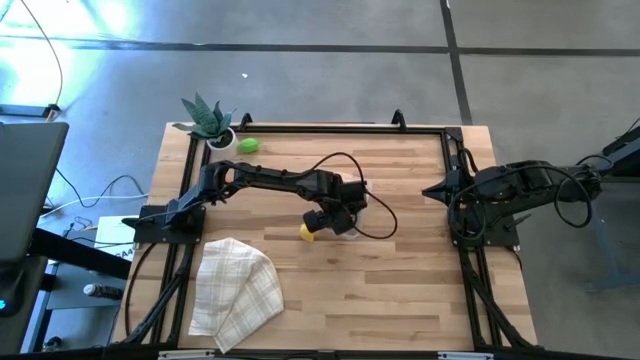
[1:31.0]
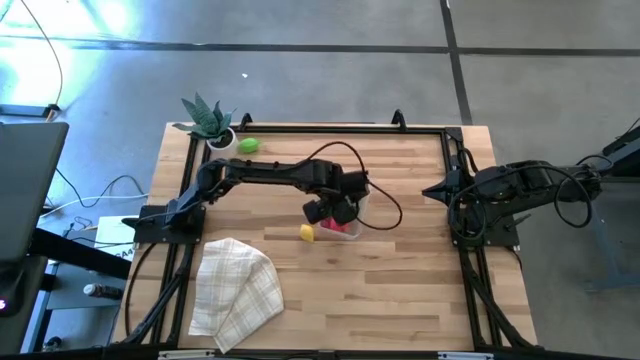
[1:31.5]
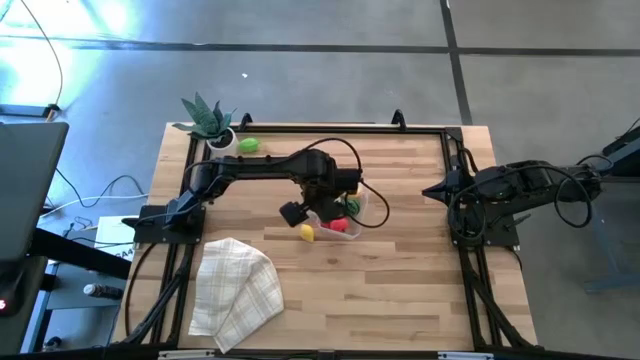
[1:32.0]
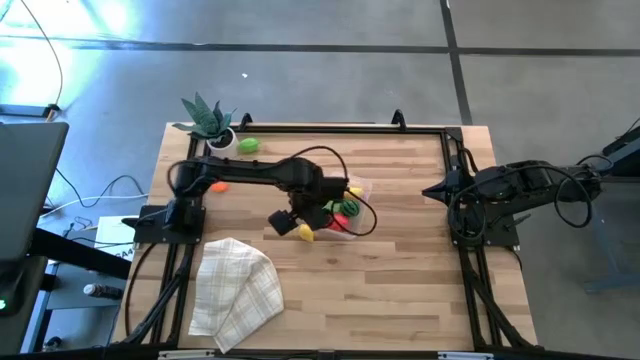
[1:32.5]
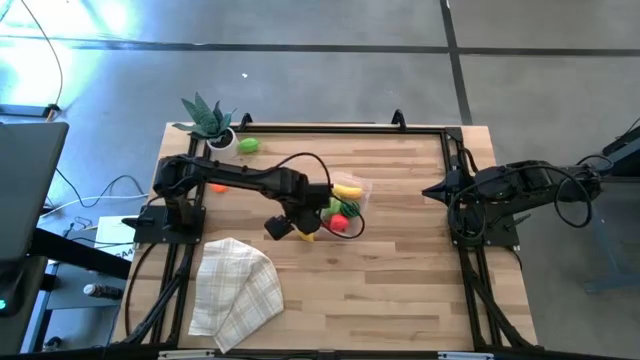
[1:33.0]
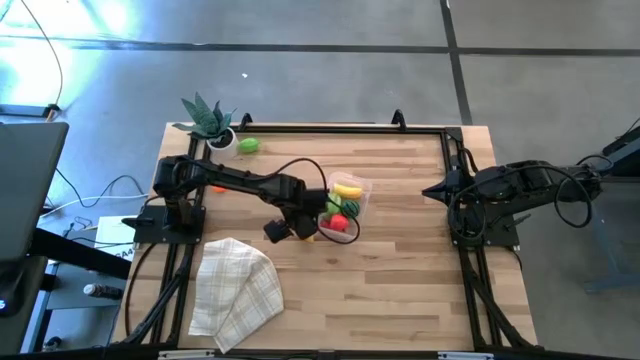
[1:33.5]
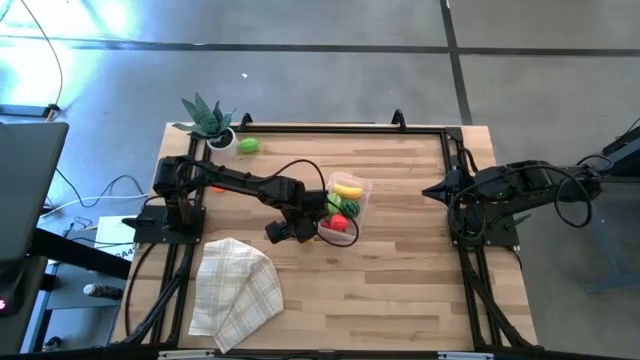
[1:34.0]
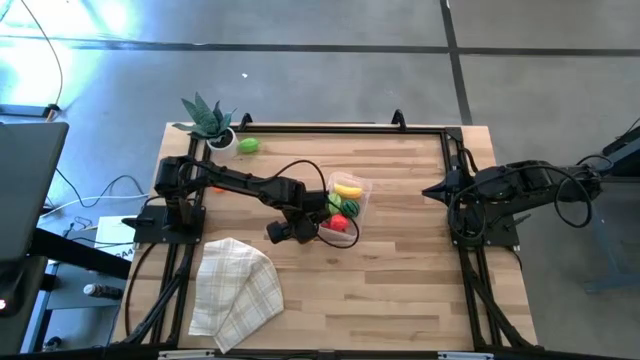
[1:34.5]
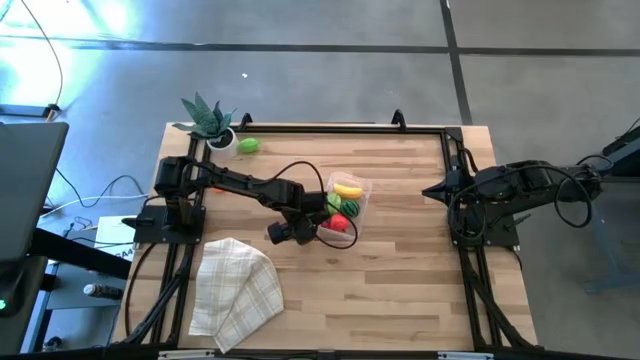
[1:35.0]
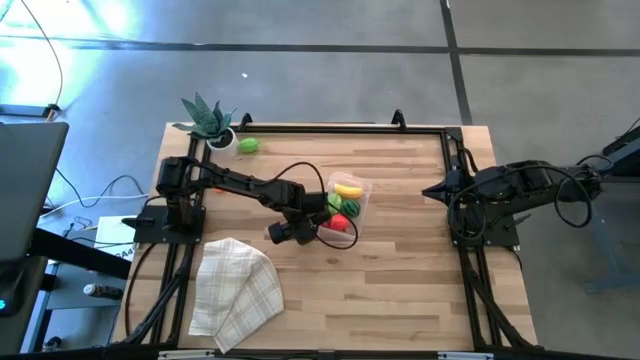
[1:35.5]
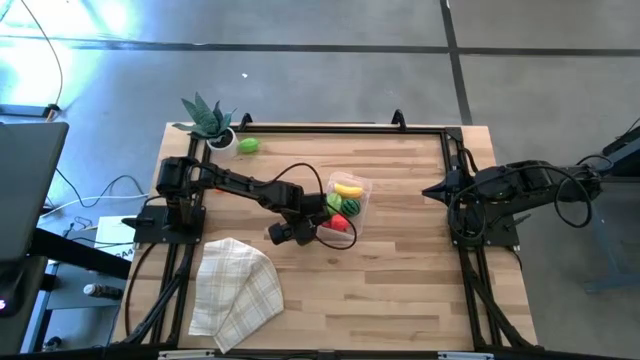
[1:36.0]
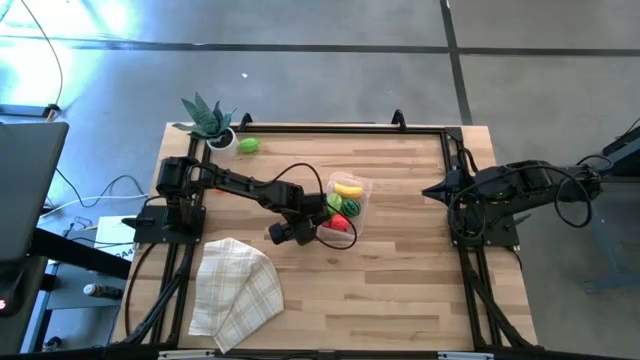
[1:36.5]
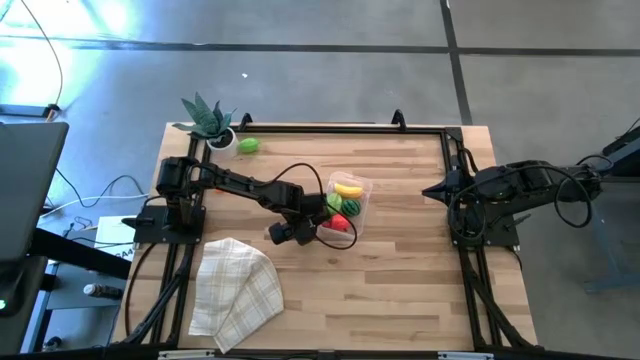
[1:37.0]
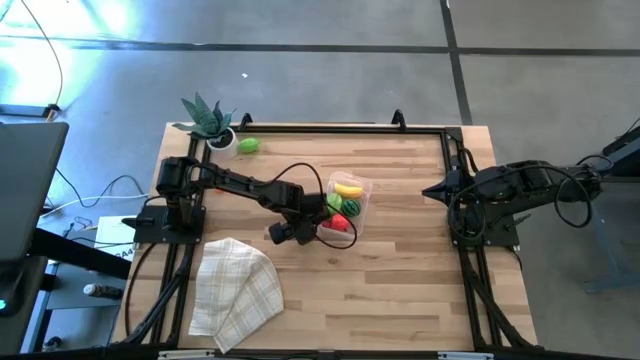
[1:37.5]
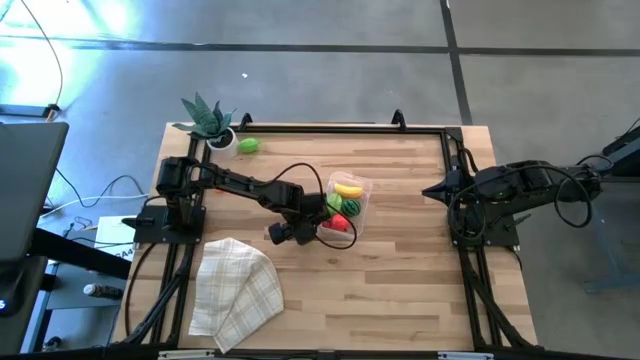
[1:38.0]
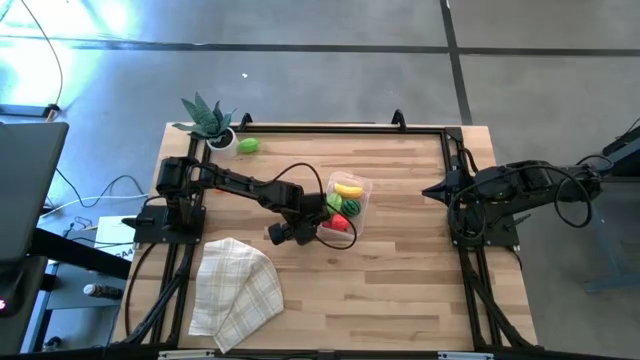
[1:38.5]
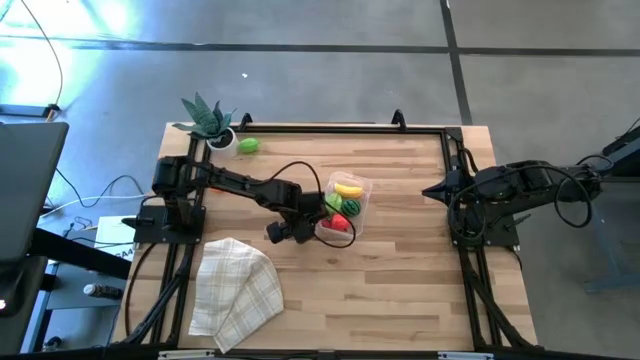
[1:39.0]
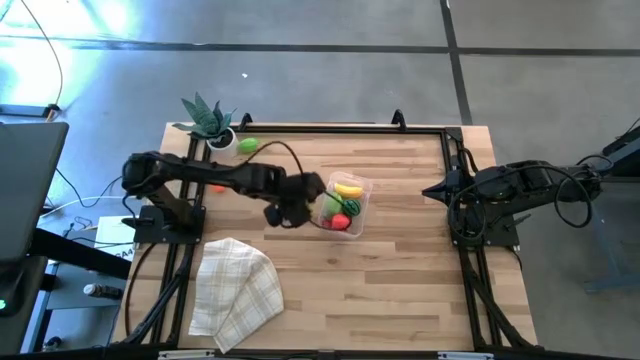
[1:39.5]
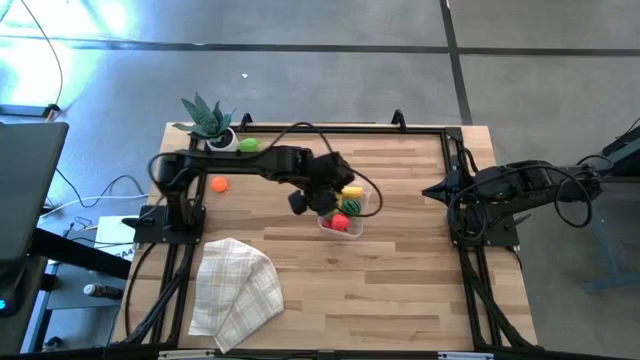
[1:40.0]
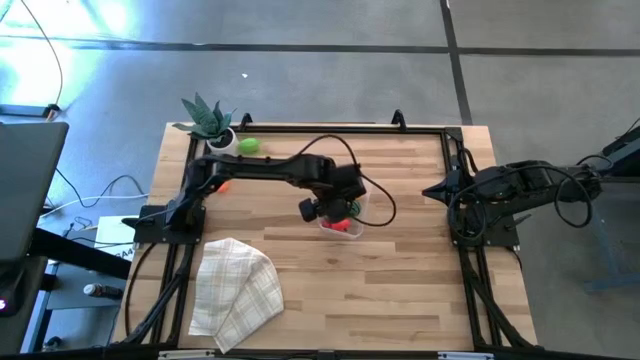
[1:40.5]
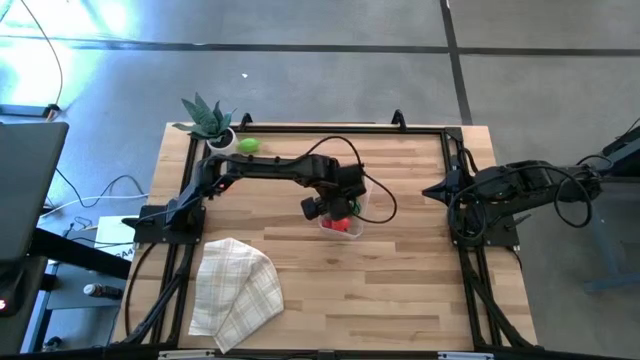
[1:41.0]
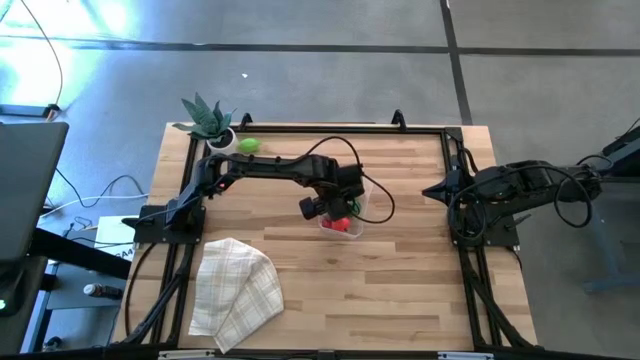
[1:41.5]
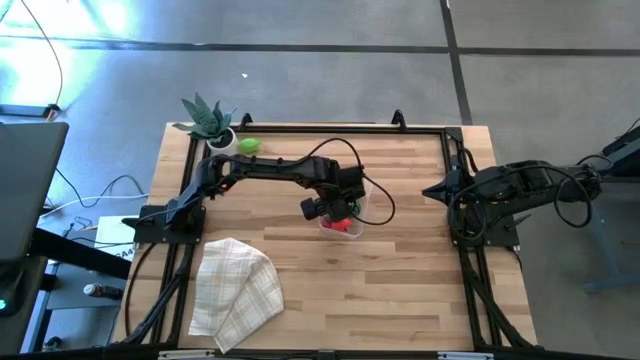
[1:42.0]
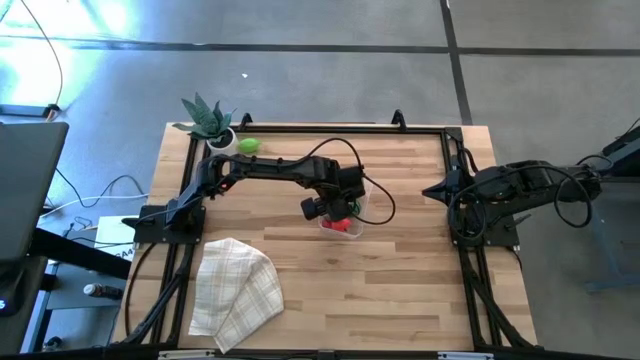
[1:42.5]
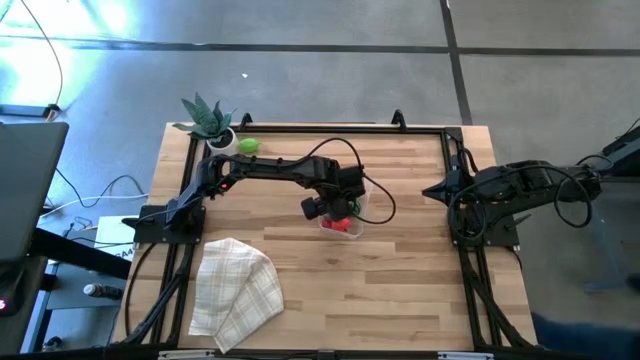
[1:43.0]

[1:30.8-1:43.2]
Task: Pick and placing Produce into tupperware
Put the lemon into the transparent bin

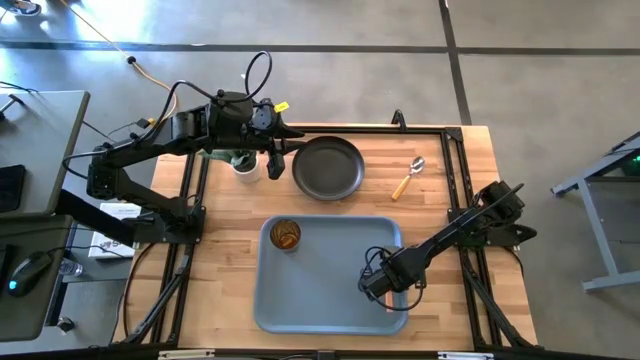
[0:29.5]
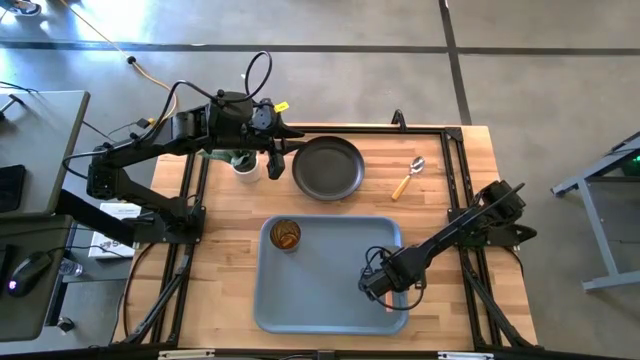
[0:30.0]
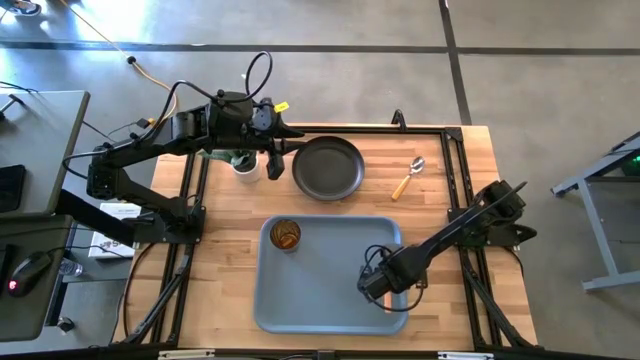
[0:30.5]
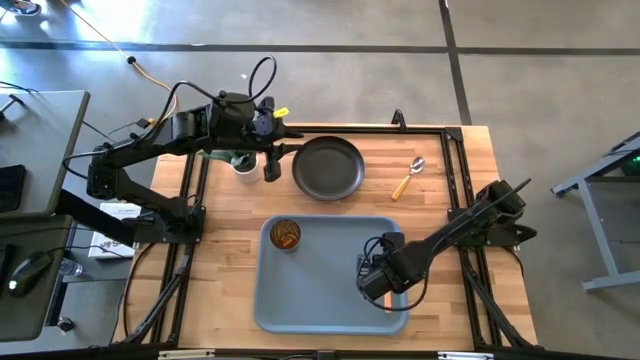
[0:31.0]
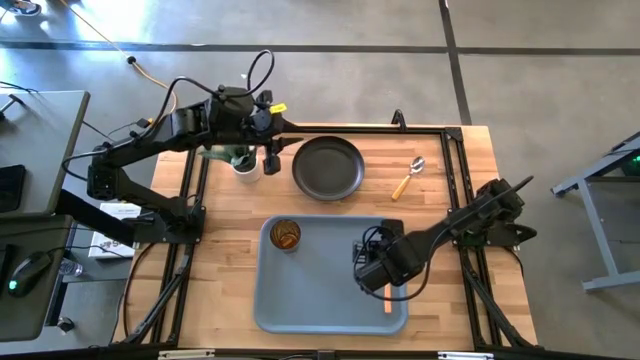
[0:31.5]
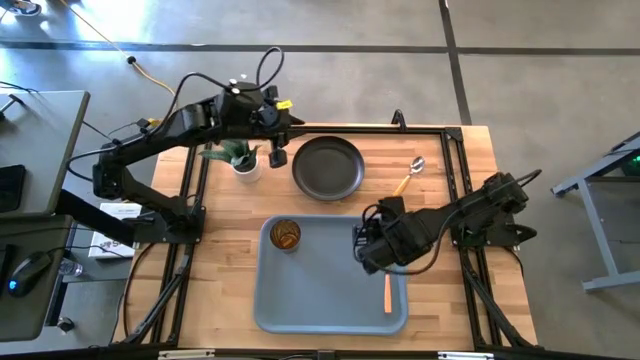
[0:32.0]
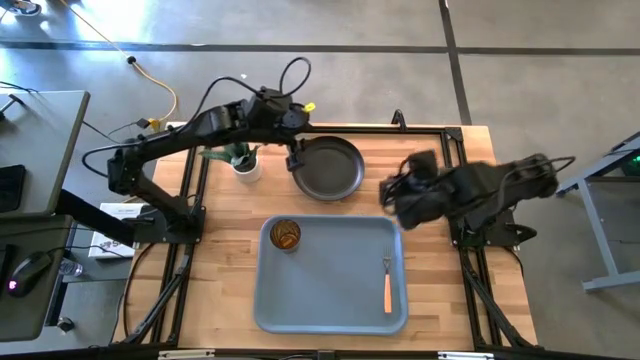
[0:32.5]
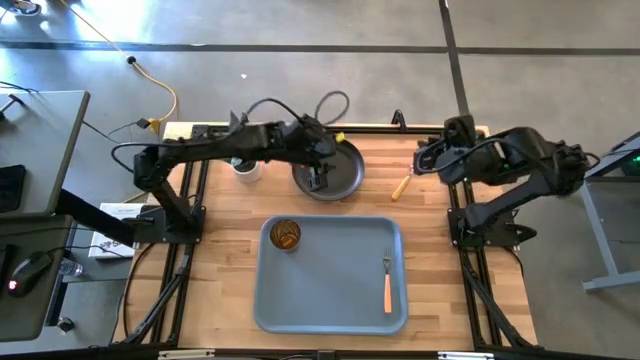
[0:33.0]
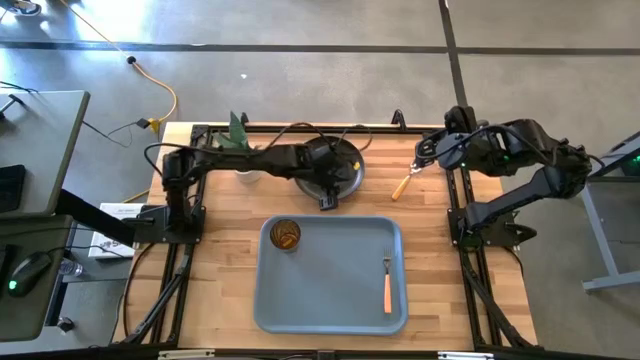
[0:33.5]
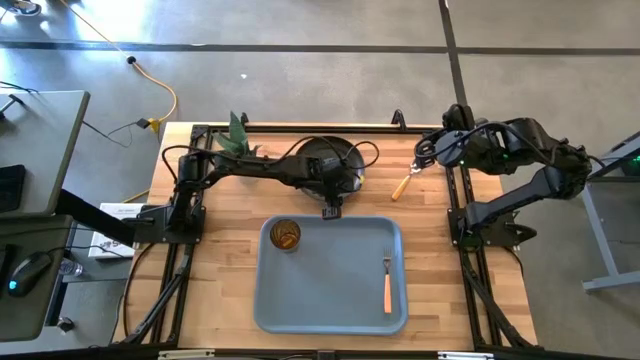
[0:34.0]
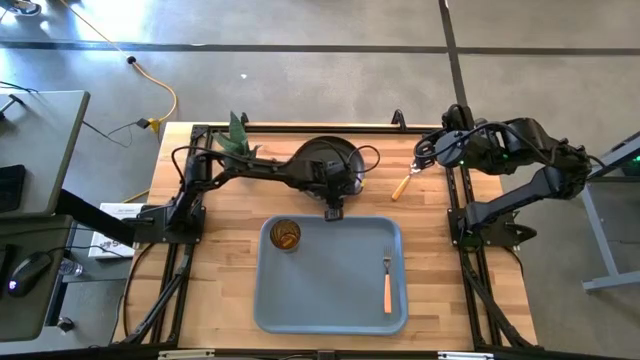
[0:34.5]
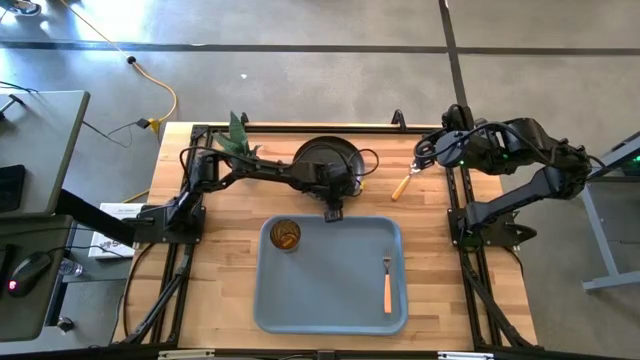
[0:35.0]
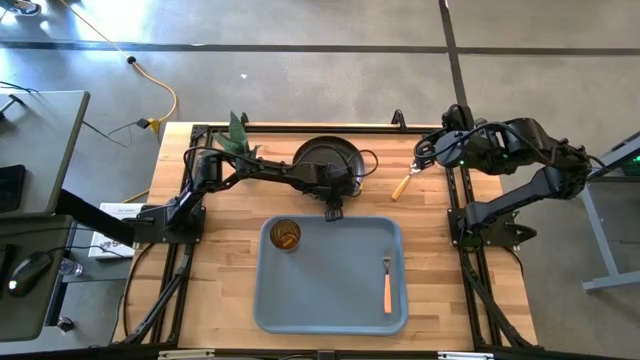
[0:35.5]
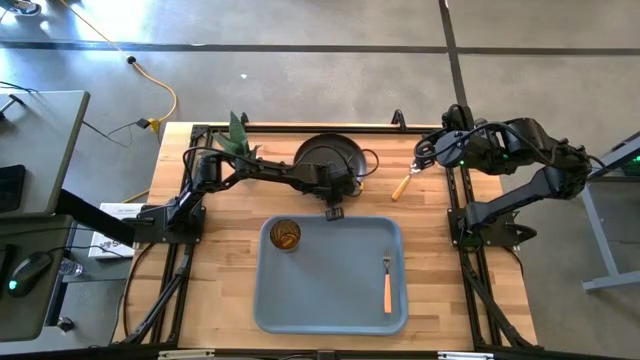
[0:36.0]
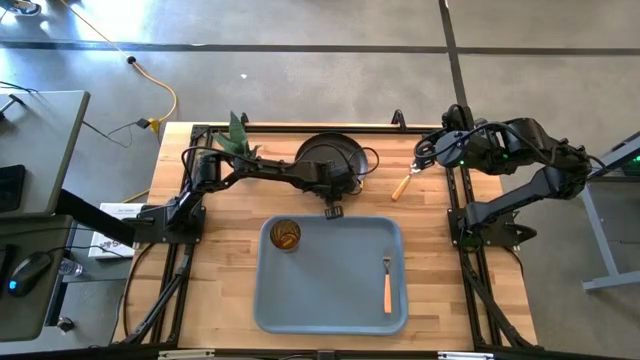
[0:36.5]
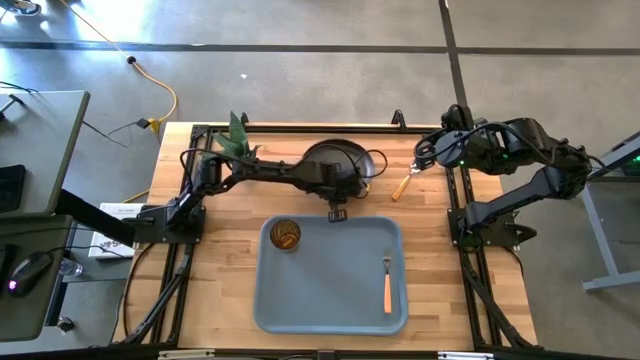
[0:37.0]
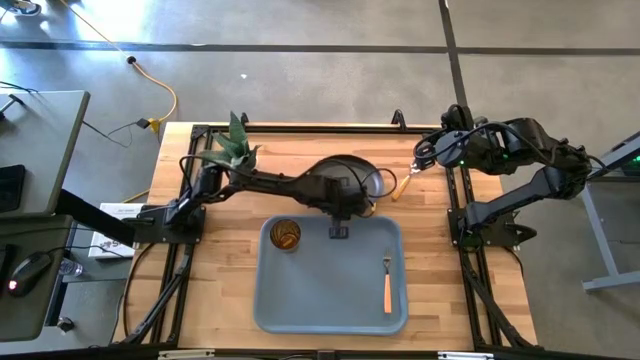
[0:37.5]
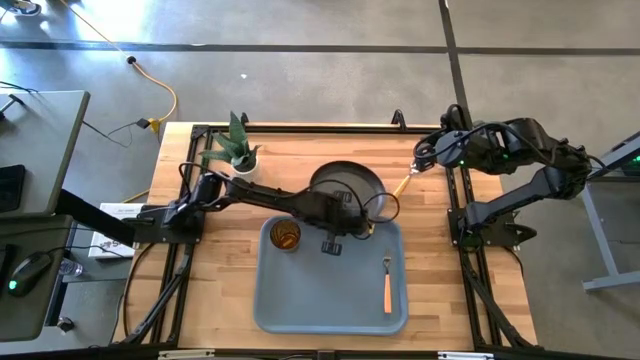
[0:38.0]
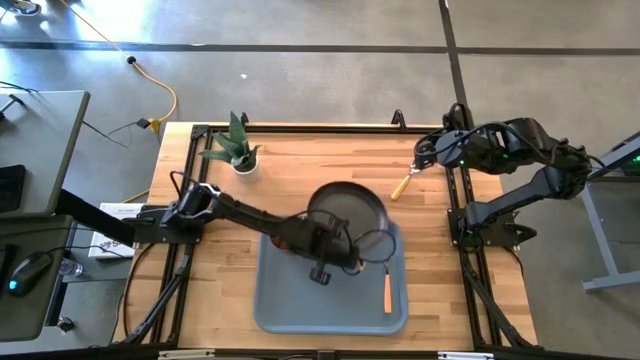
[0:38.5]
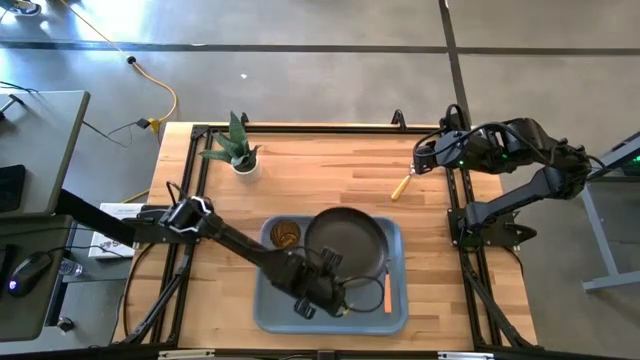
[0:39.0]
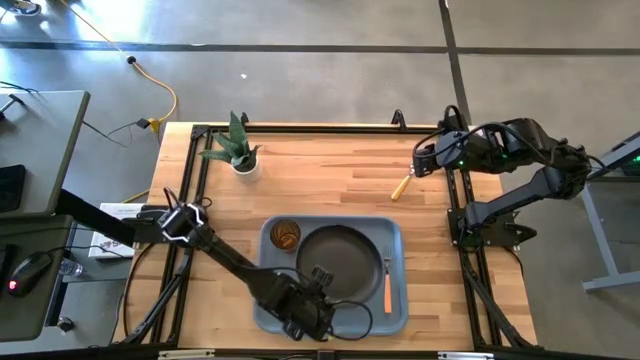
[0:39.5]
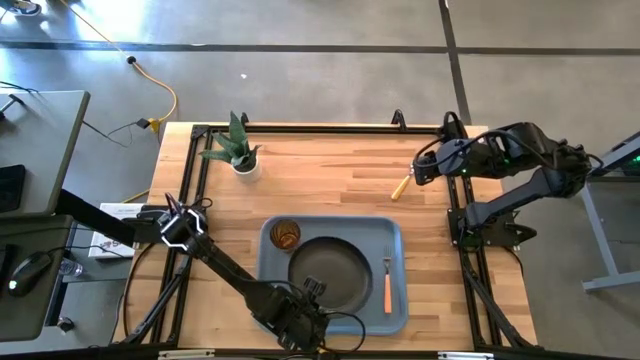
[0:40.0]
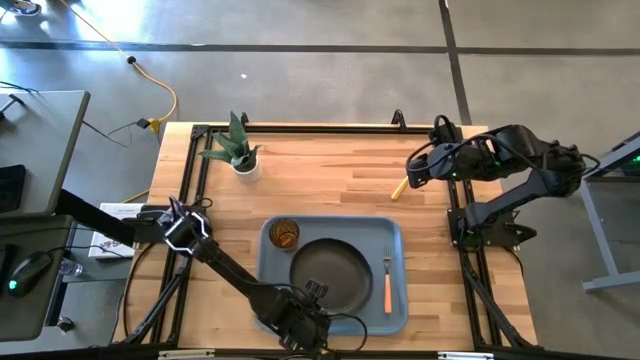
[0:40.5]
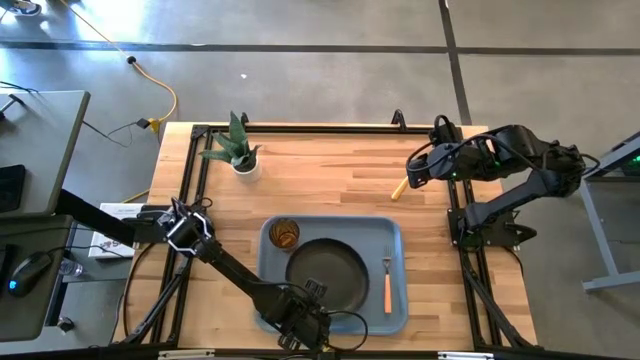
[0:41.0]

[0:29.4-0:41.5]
Task: Pick and place plate/cup/fork/spoon on tray
Put the black plate on the blue tray to the bottom right of the brown cup
